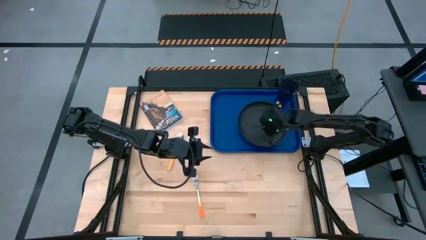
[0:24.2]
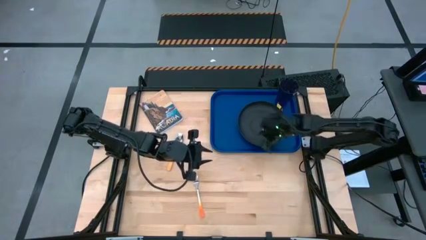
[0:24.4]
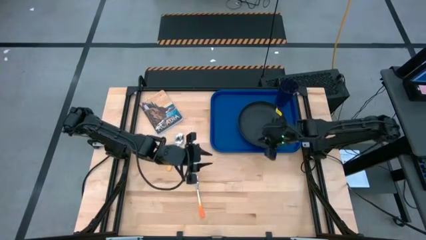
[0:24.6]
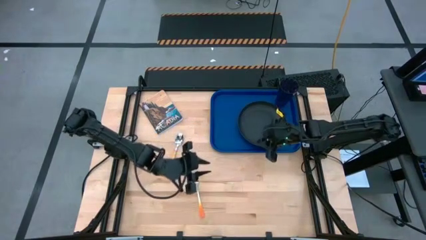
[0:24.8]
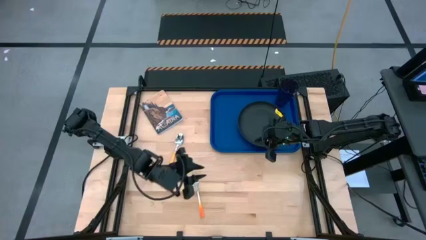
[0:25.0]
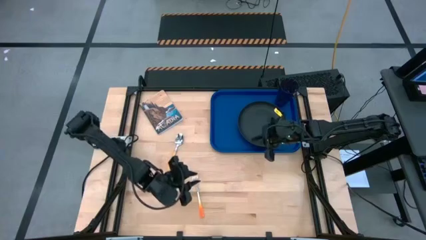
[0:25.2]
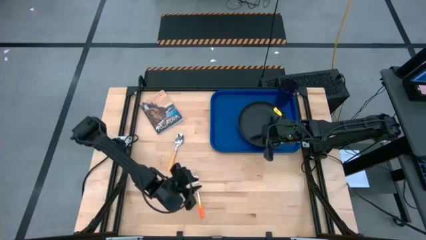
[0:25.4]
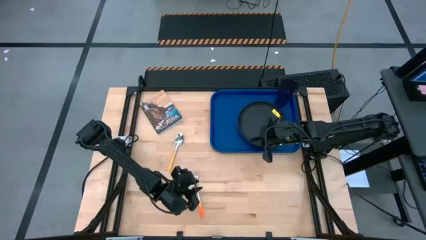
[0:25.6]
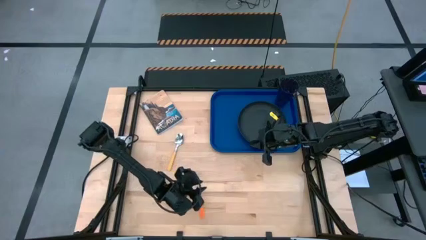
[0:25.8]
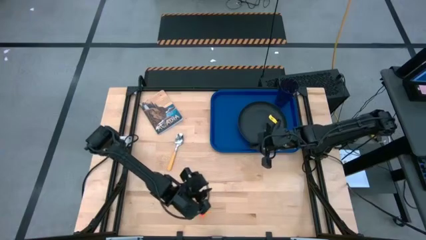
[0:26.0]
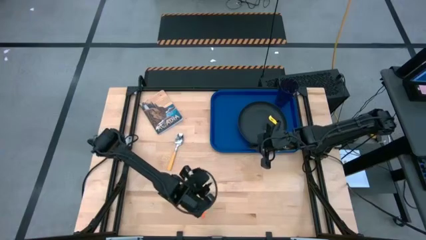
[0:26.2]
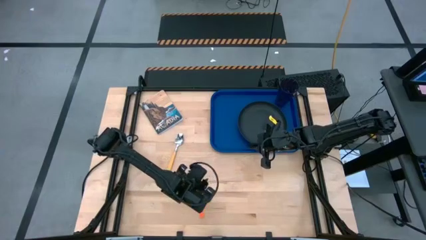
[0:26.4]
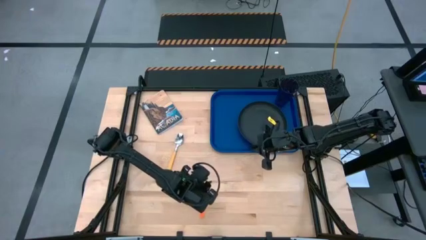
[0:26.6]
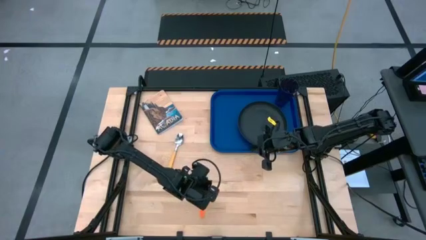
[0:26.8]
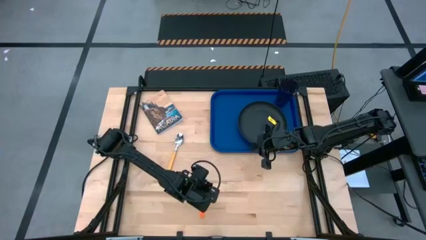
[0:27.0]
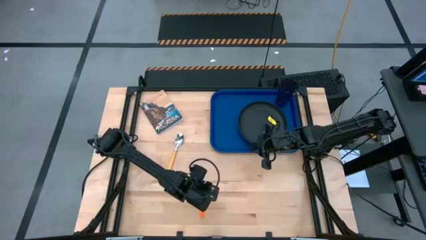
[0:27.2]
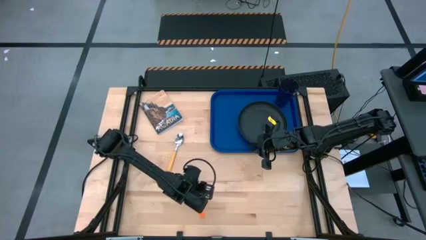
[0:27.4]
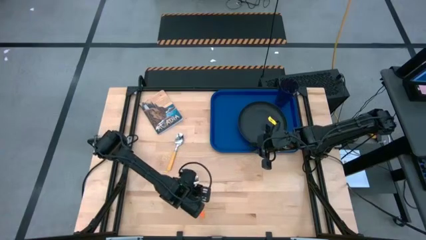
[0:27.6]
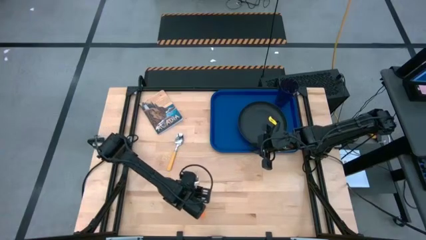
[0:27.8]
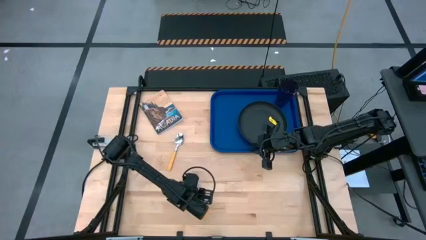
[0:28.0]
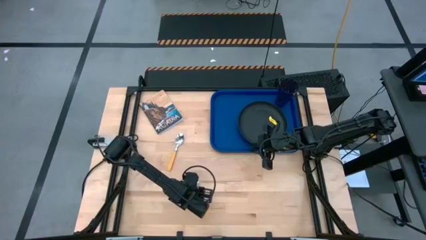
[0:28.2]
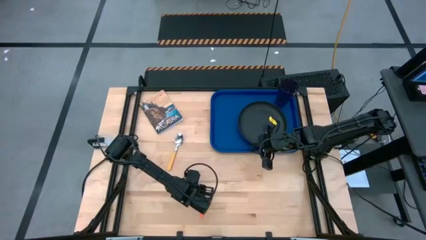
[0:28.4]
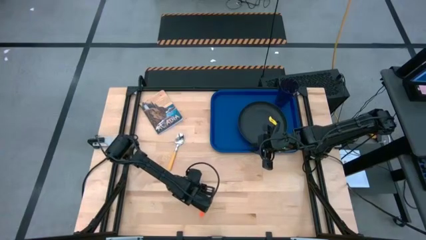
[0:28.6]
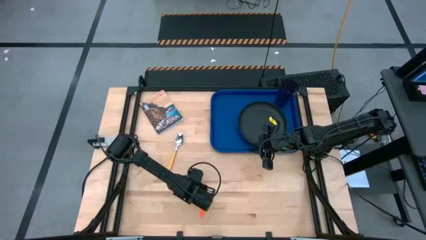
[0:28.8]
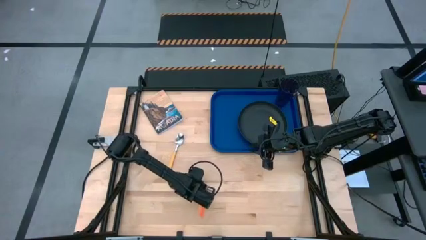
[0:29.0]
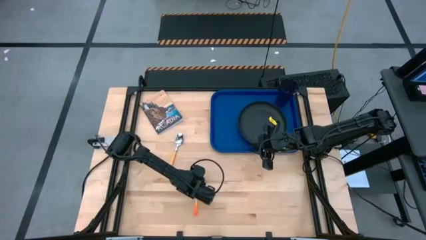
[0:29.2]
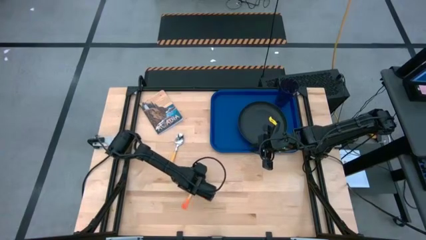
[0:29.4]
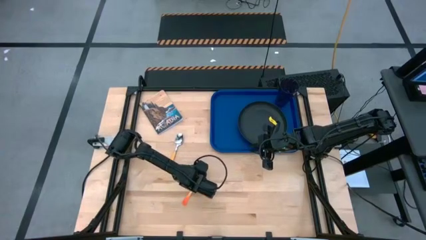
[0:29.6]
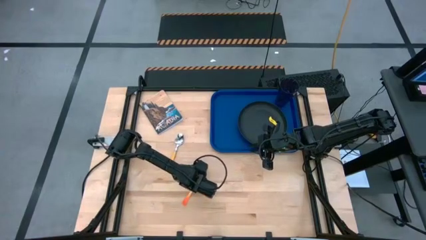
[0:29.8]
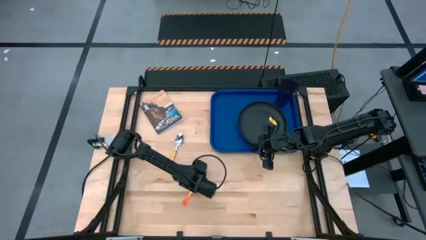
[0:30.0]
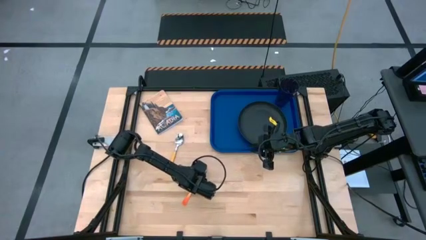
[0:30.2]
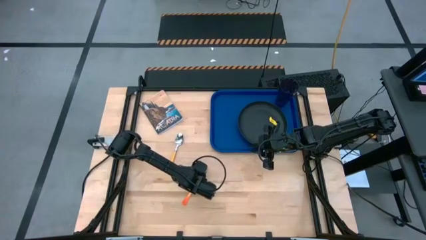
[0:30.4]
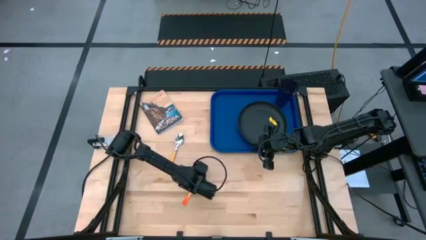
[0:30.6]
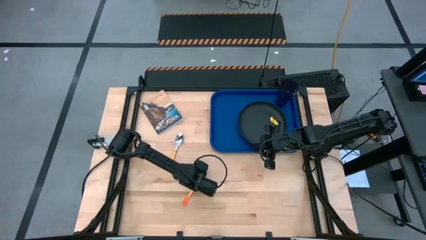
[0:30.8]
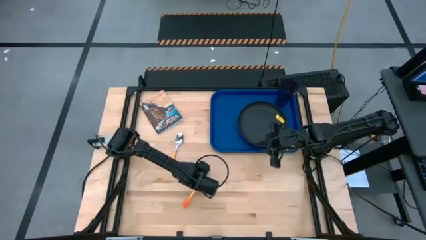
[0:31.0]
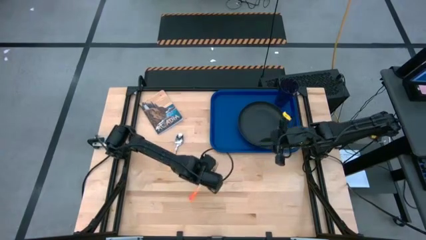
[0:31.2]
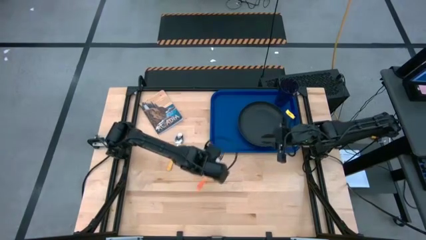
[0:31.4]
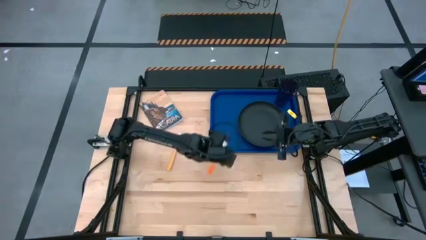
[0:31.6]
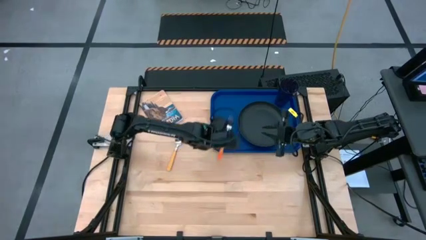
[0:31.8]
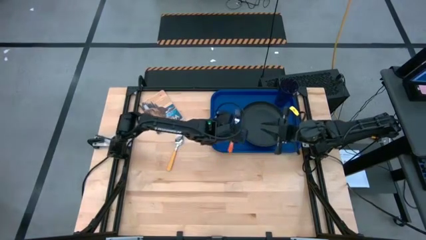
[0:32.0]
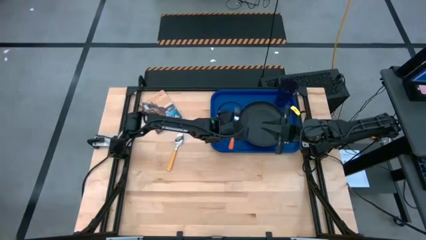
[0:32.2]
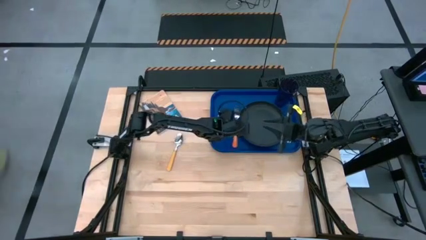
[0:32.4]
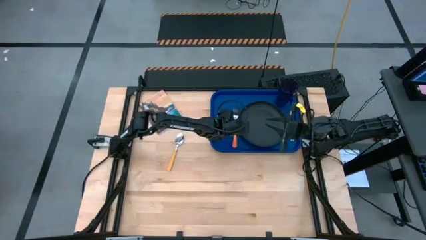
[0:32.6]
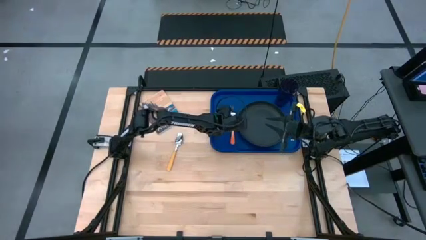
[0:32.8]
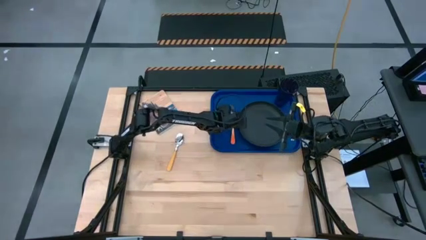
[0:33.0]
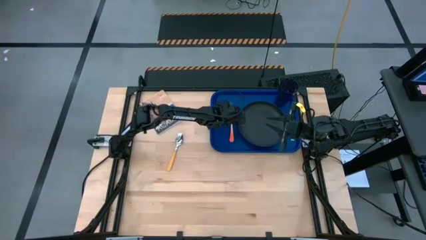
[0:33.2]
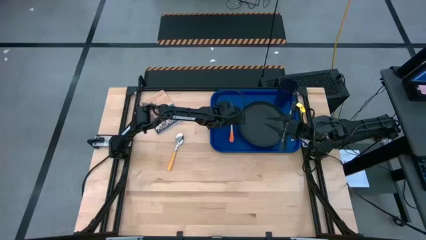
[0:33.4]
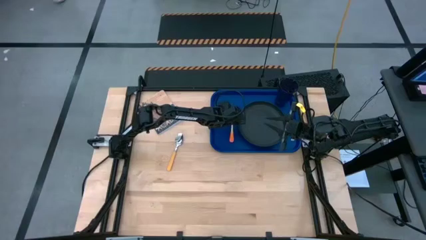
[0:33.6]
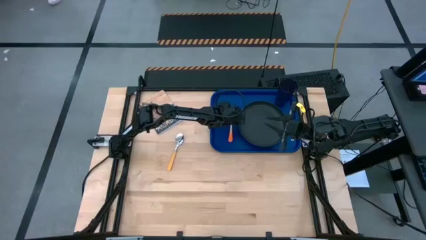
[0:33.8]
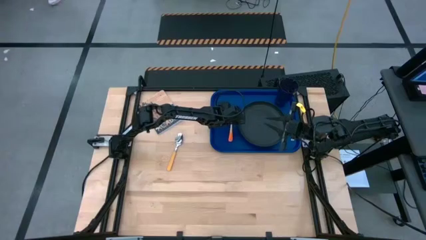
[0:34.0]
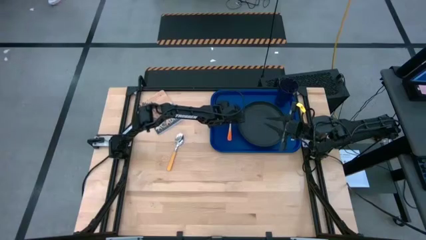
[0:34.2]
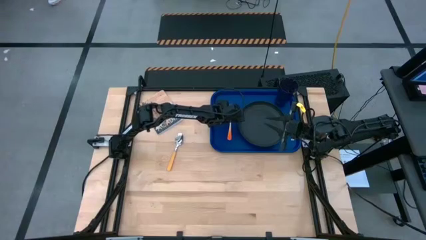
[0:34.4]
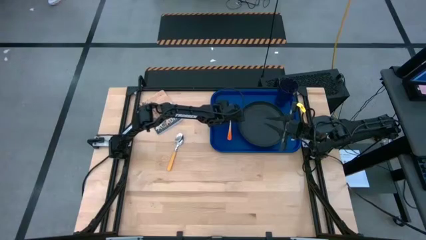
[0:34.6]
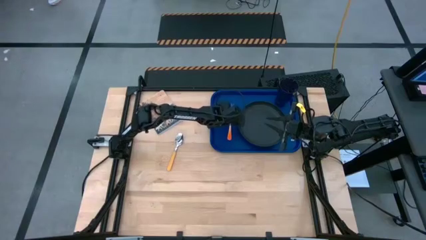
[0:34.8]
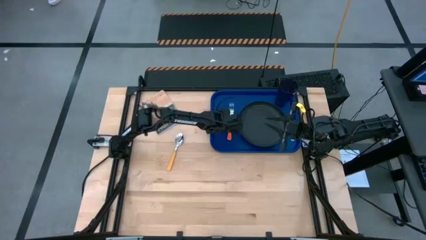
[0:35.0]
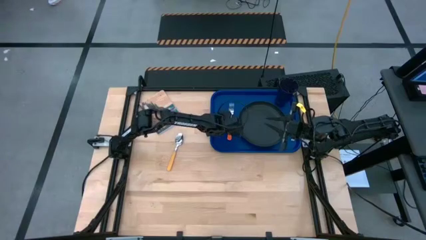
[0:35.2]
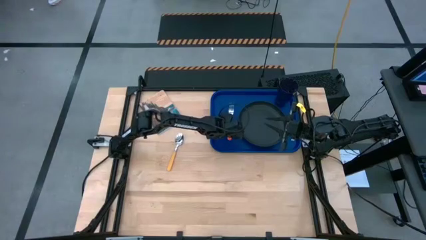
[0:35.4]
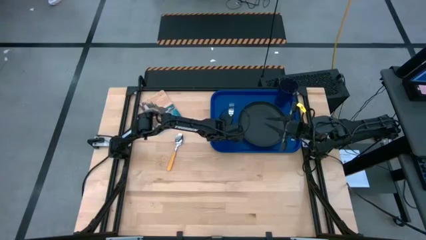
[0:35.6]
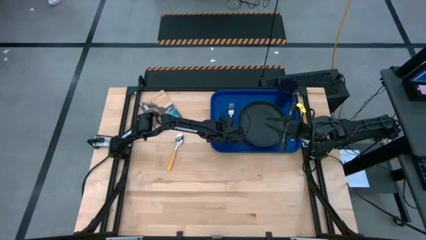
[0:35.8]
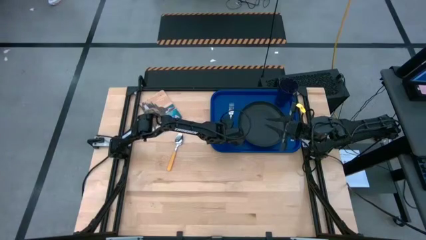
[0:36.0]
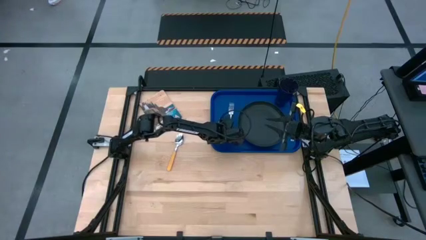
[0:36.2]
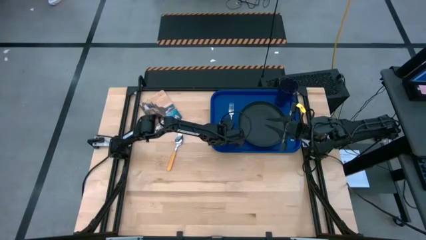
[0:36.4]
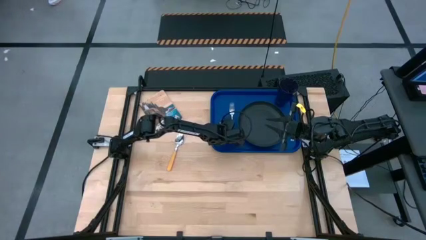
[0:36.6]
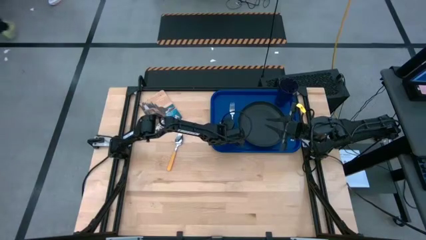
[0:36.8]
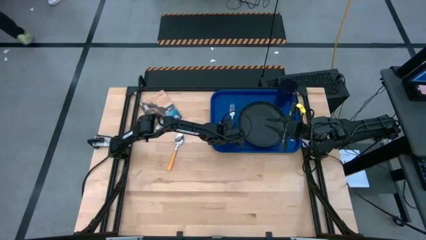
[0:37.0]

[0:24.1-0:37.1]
Task: Pick and place plate/cup/fork/spoon on tray
Put the orange fork on the blue tray to the left of the black plate
